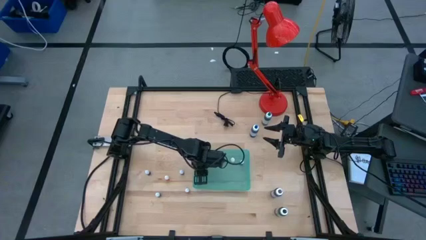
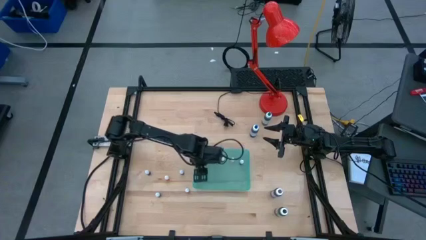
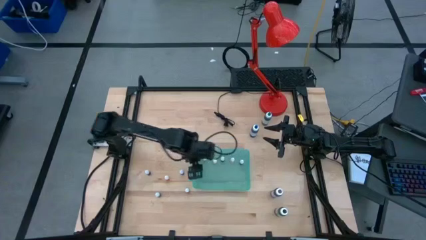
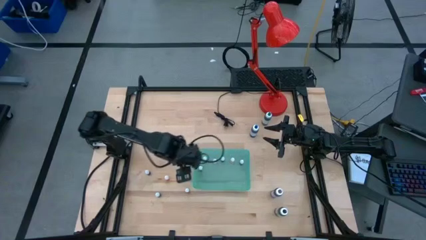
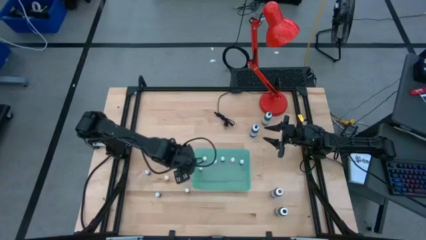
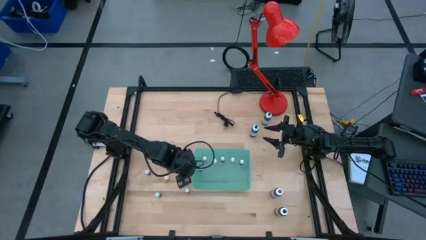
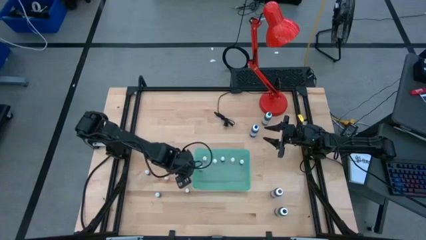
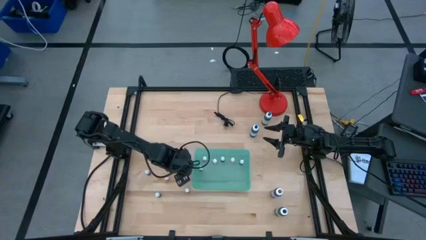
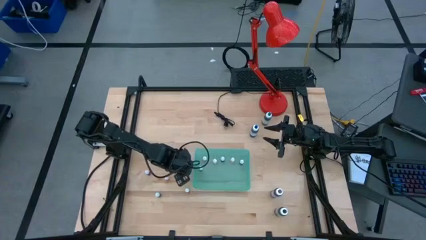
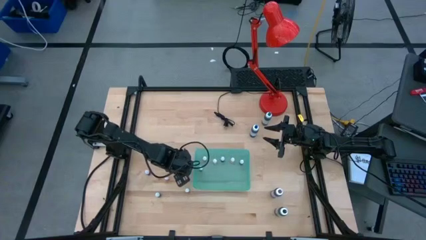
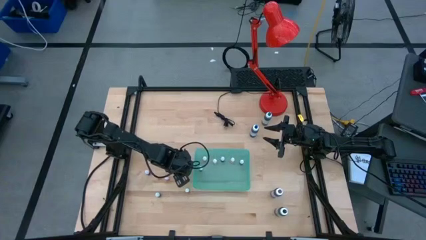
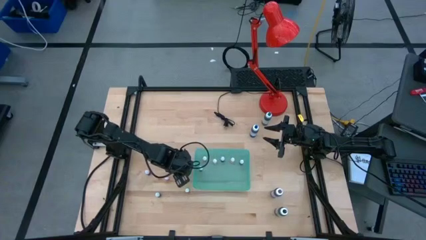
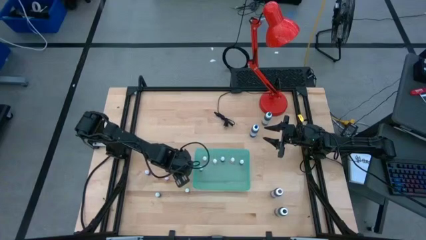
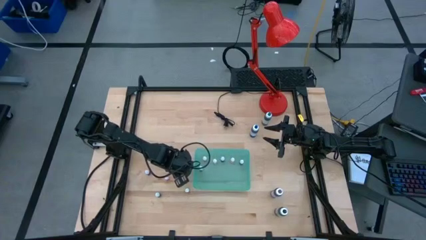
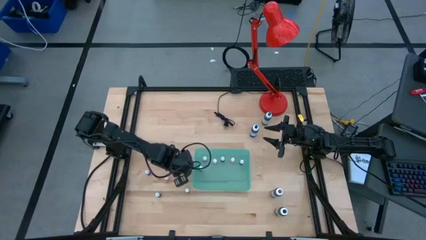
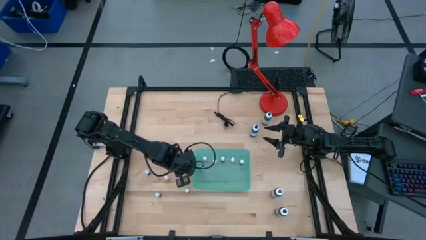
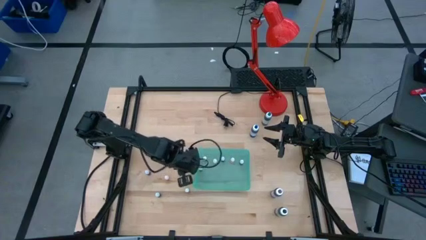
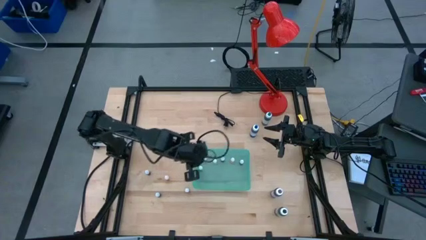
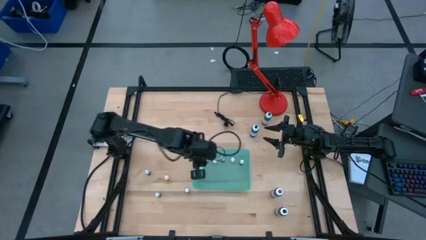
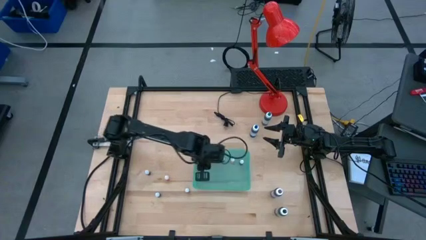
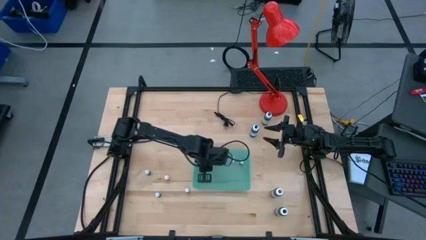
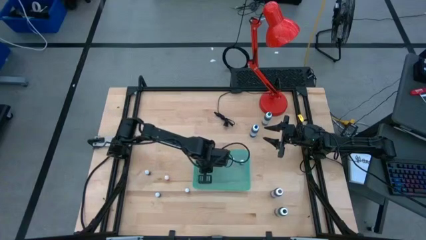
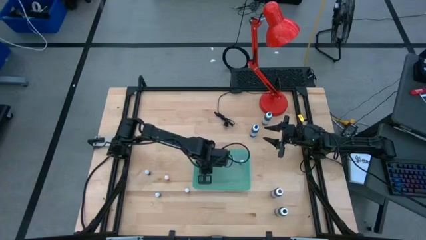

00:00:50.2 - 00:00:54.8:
Task: Pick & Place food coloring
Put the small orange food coloring bottle into the light blue bin

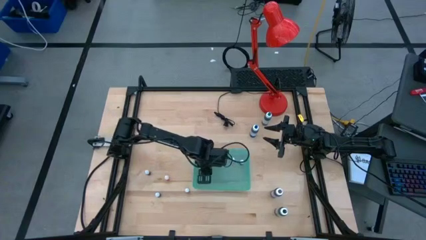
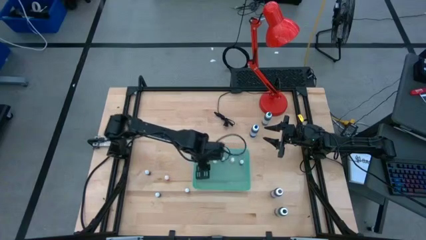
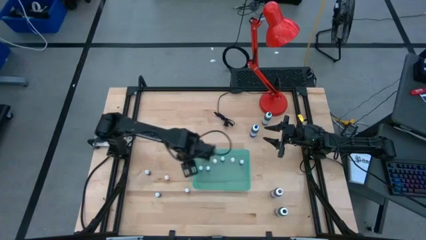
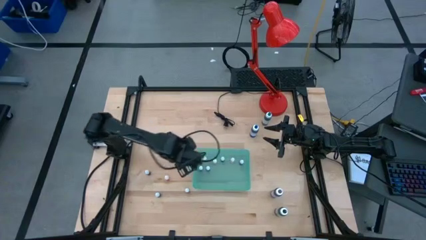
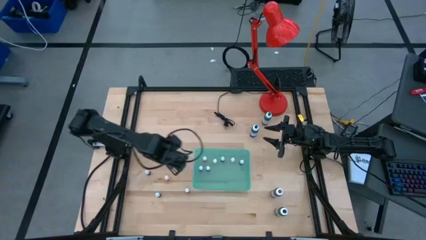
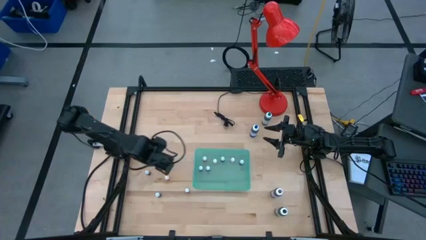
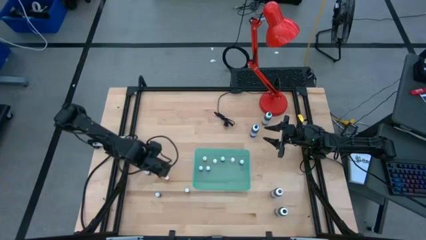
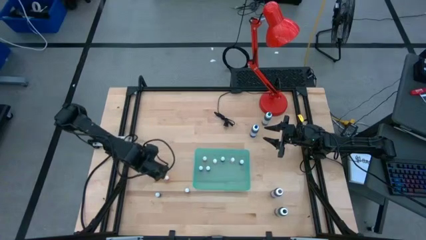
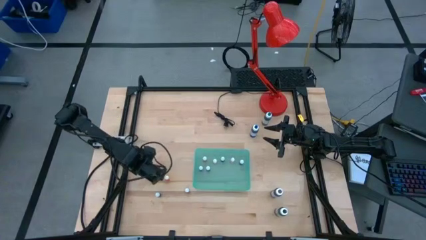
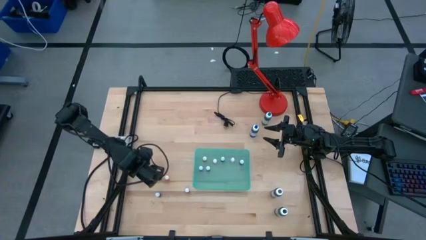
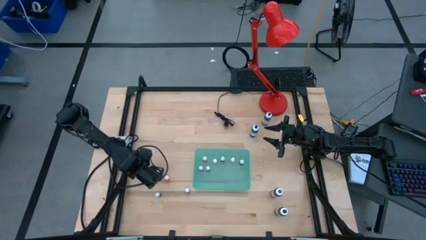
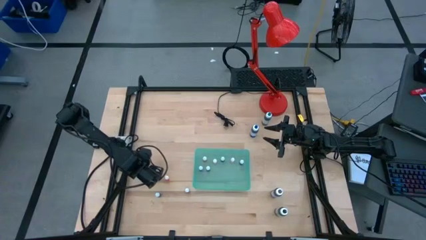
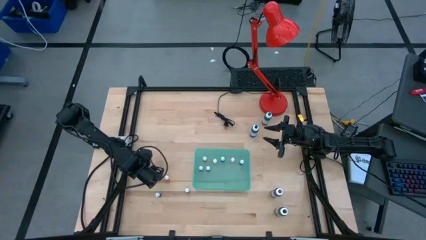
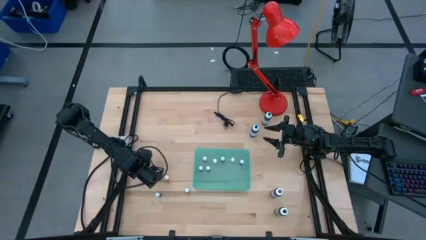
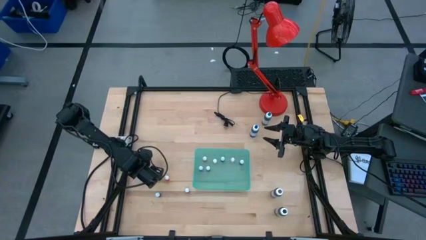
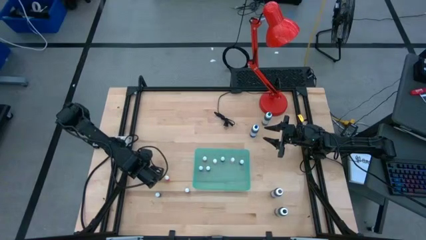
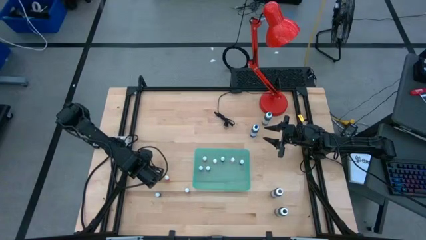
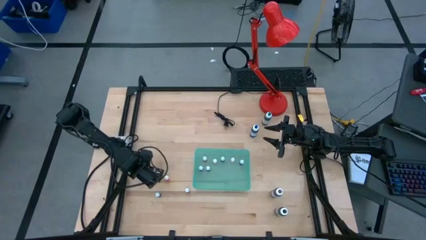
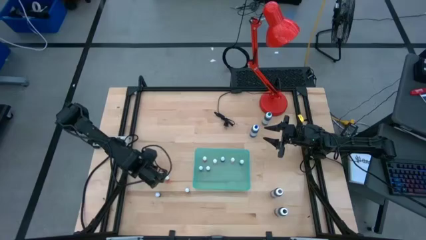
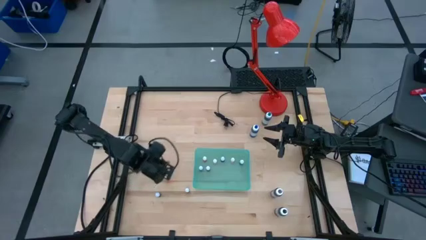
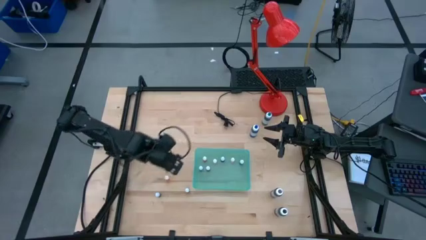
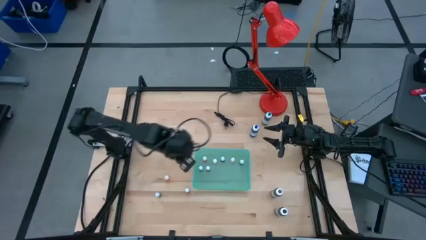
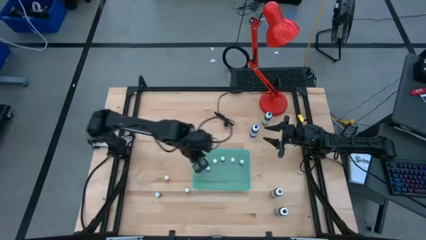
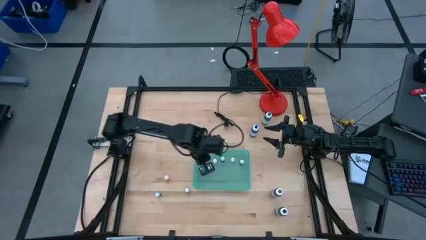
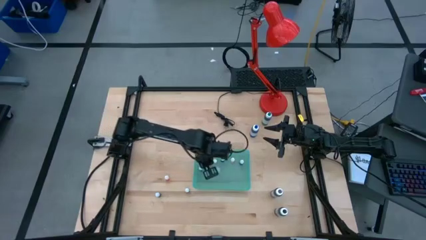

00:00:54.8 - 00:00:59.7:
Put the small purple food coloring bottle into the light blue bin

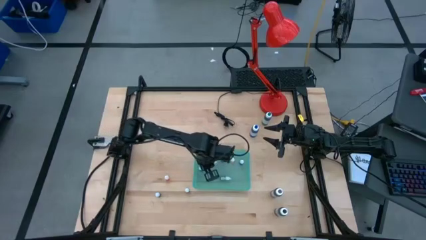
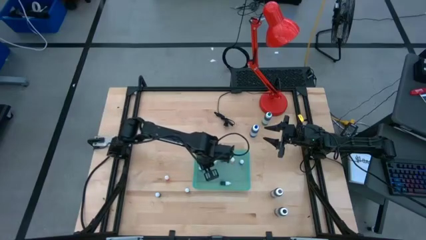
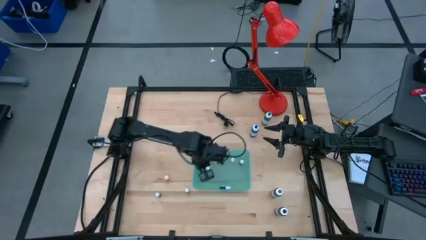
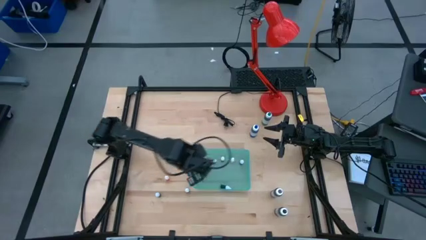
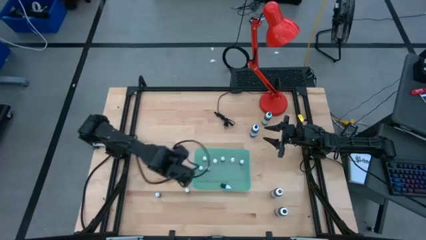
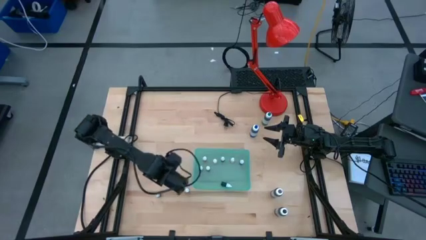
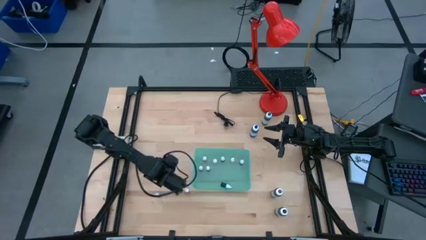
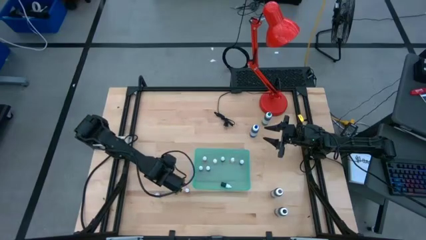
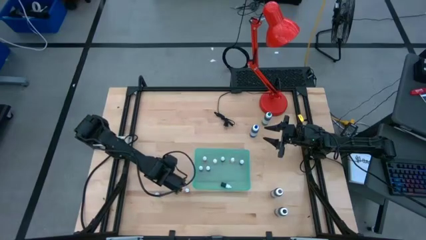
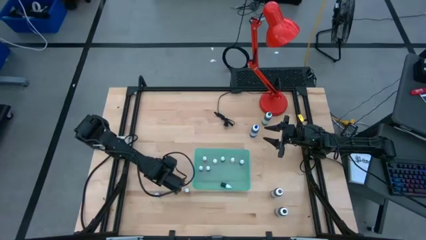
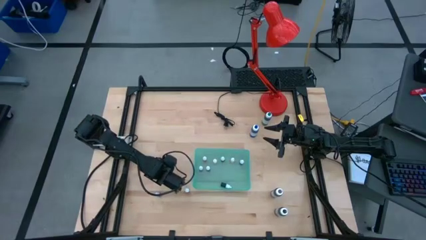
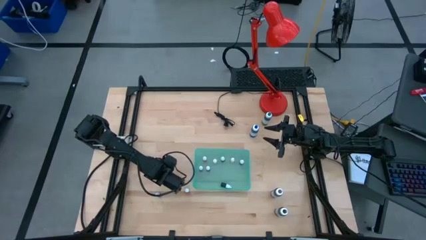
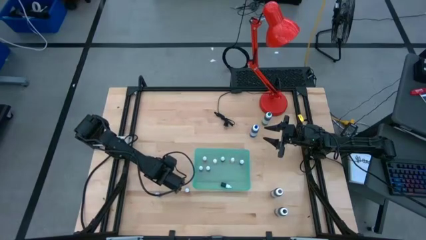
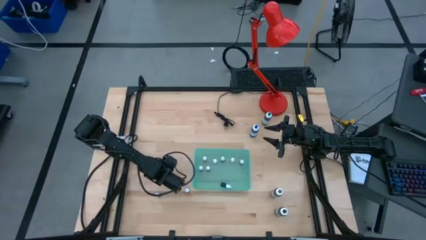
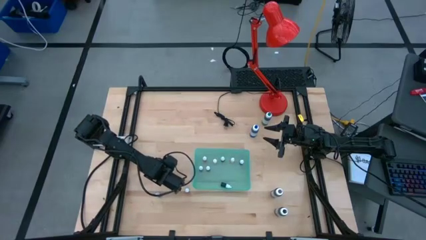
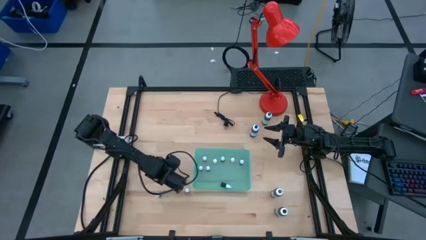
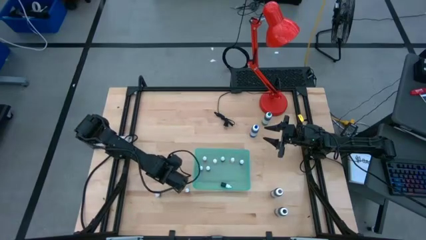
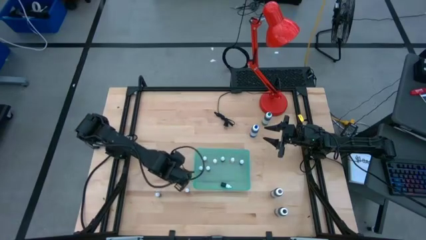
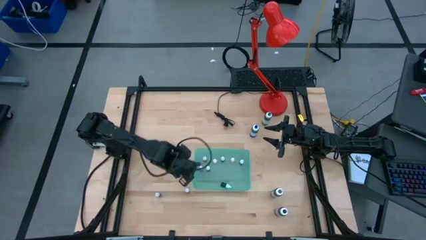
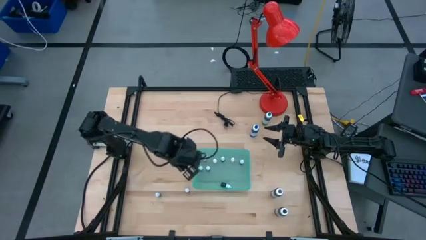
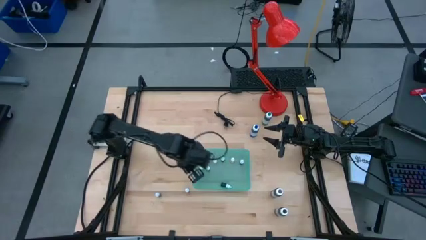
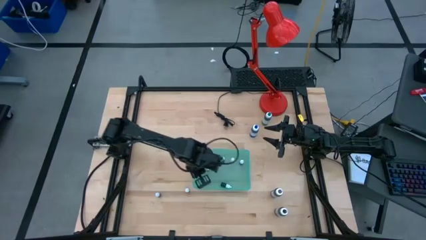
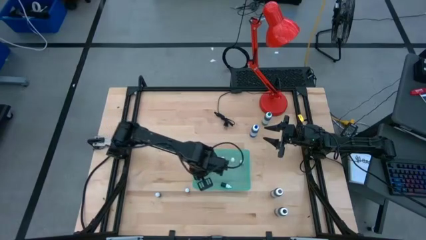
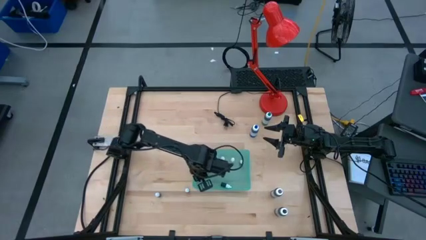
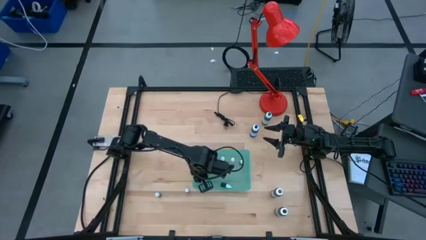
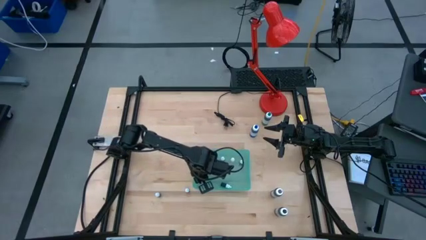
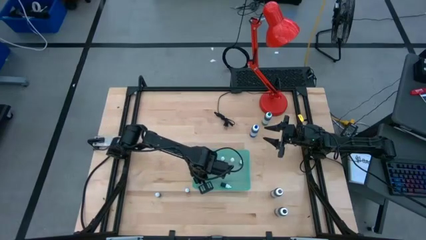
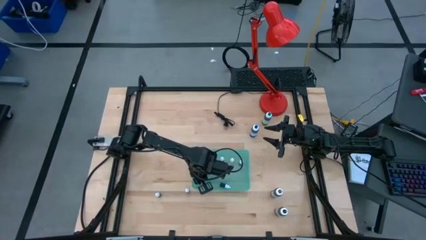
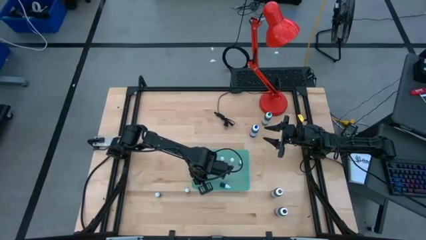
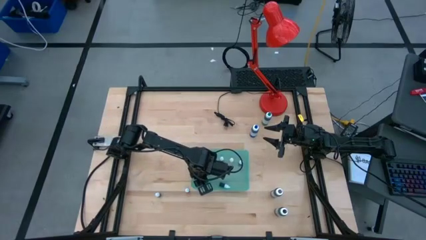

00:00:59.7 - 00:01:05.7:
Put the small yellow food coloring bottle into the light blue bin

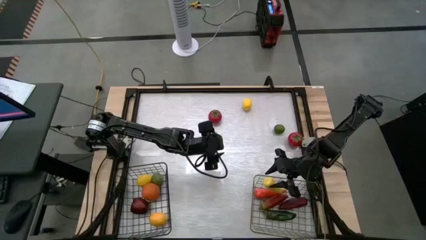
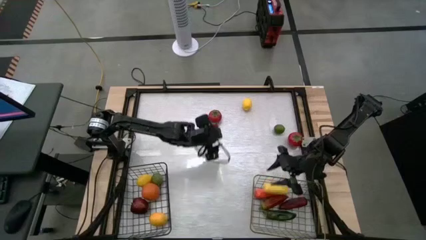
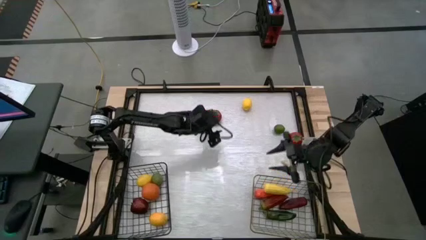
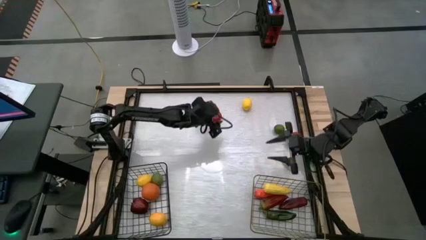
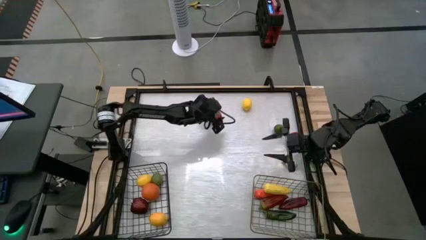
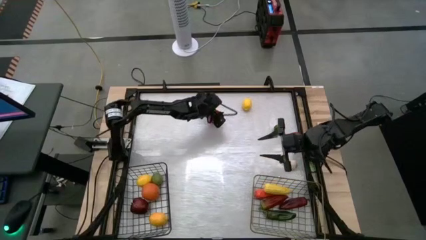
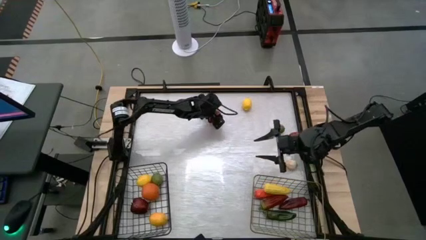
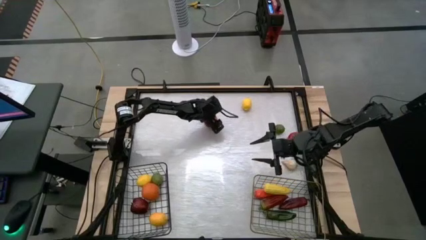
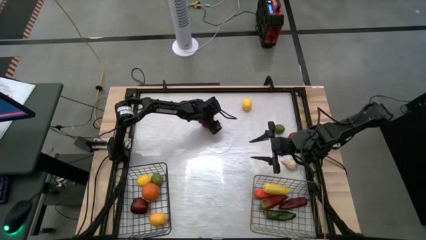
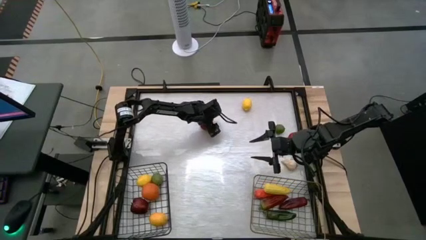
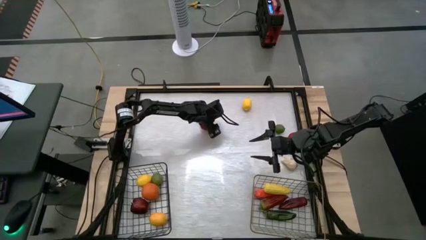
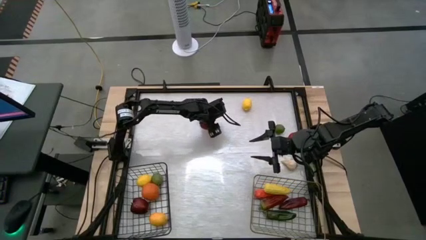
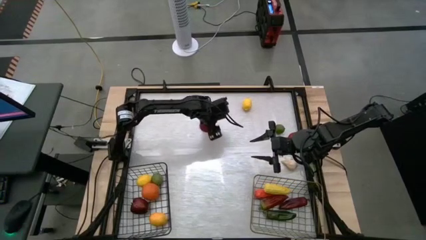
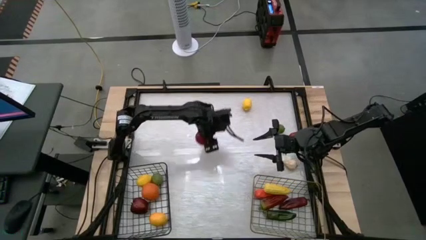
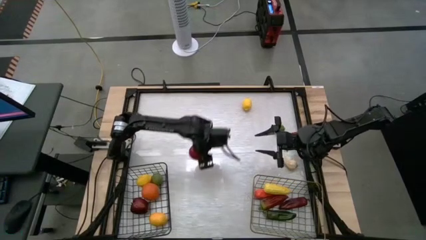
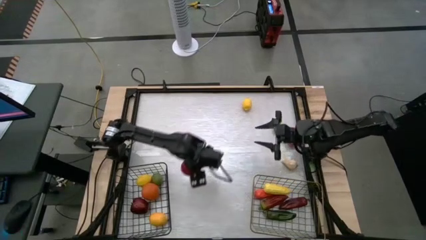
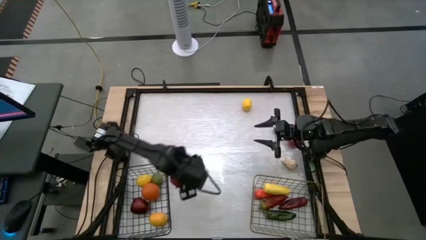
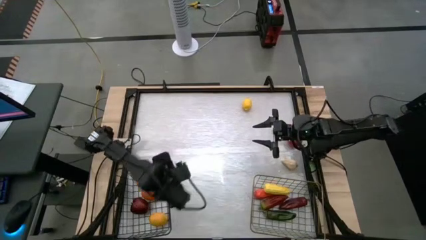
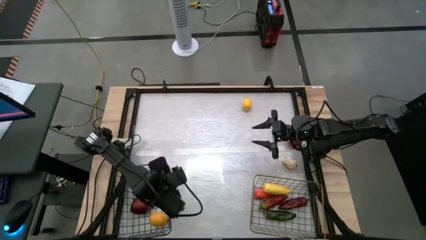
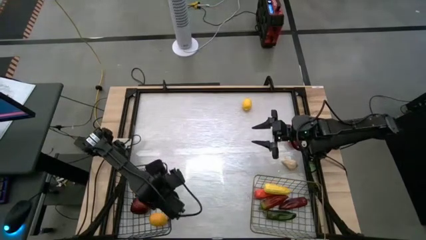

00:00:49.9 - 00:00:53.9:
Task: Sort produce into baskets
Put the top tomato into the black wire basket
